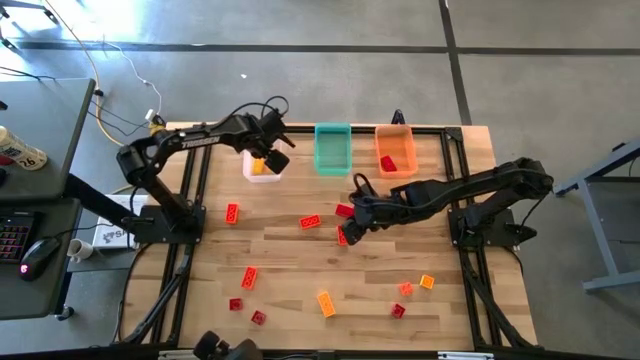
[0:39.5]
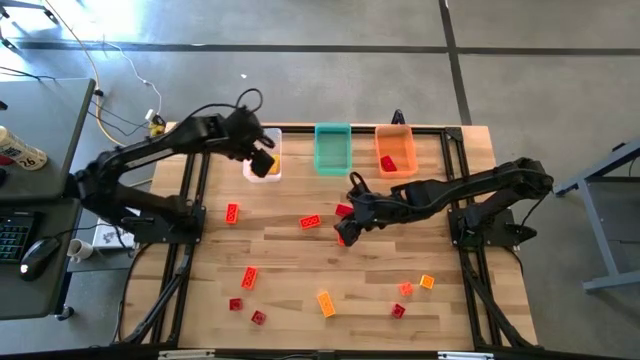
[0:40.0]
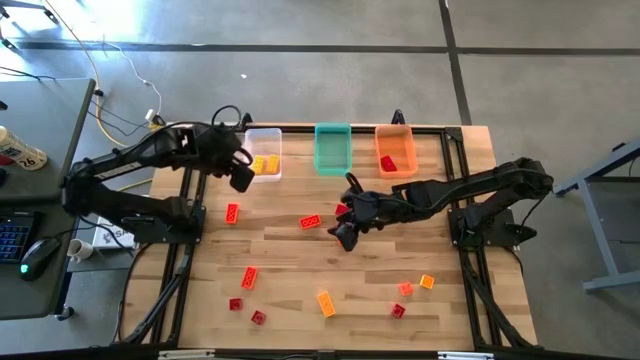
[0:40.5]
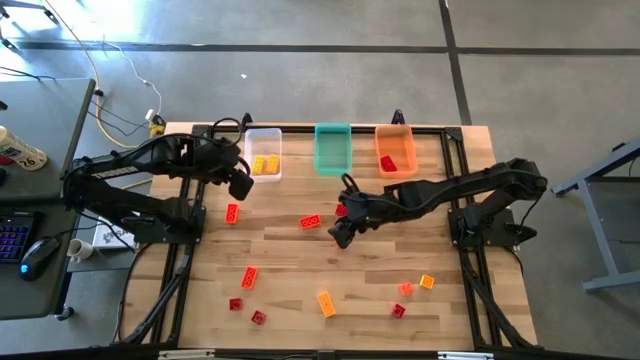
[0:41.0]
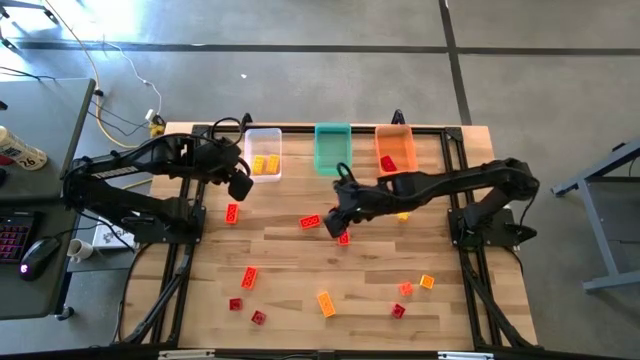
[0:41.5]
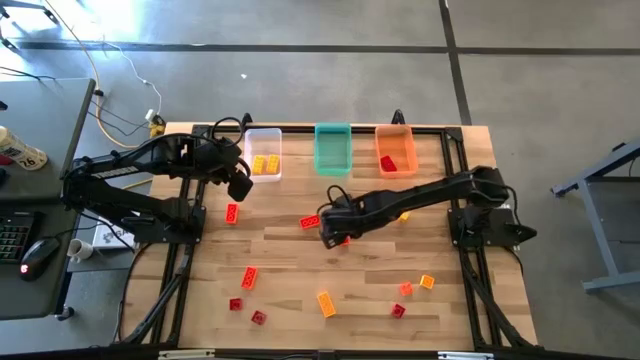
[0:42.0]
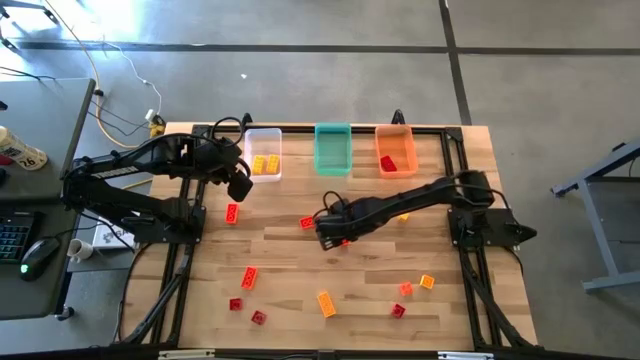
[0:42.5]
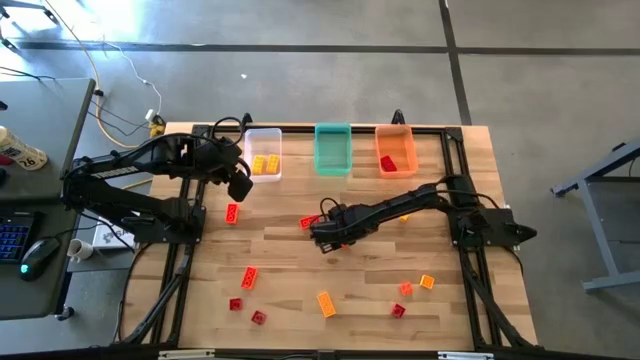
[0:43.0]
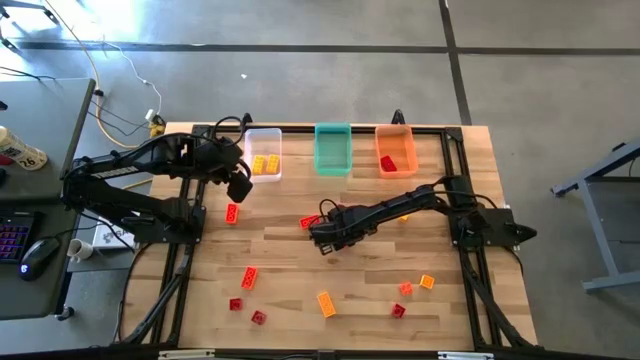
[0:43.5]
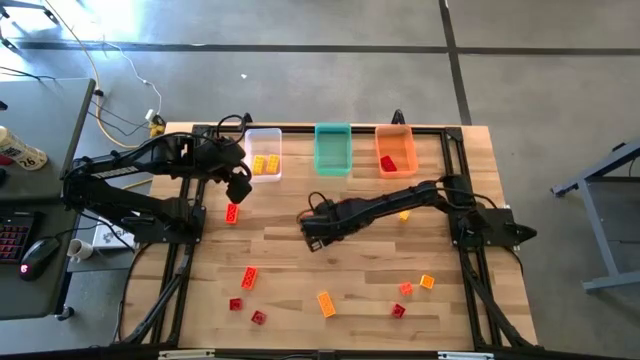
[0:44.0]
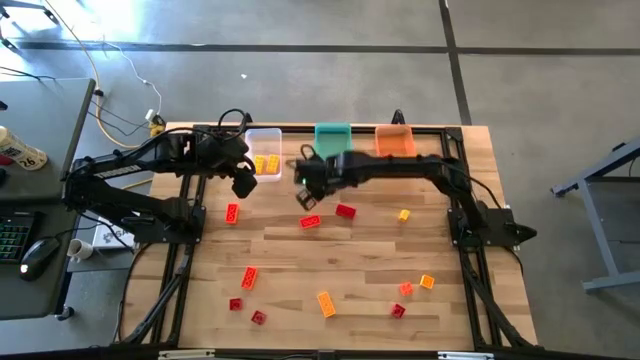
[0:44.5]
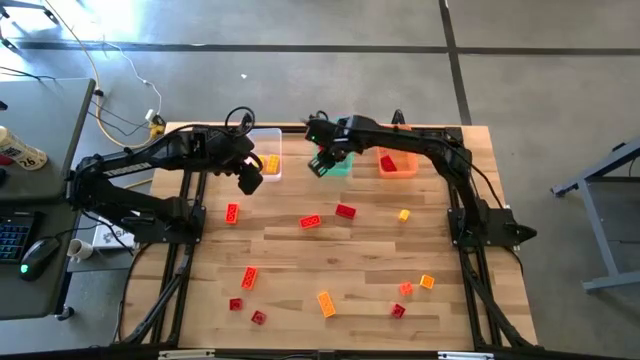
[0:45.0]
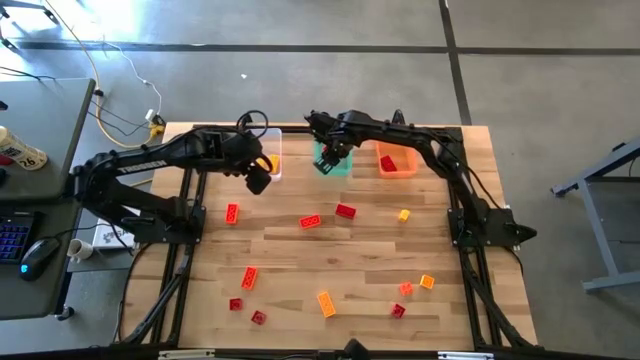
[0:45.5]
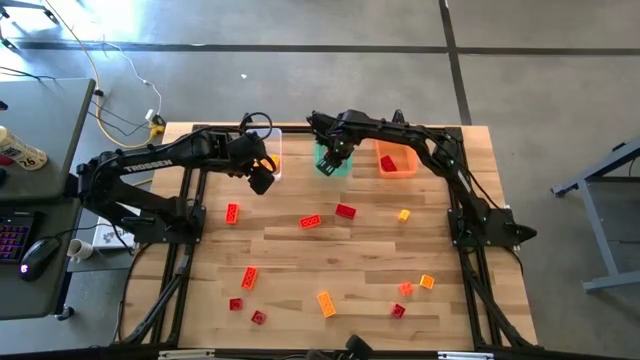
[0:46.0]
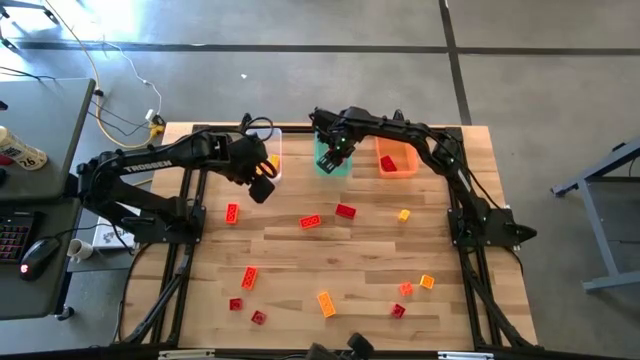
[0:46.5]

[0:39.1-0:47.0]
Task: Sort & place blocks by color
Put the orange game piece into the blue bin

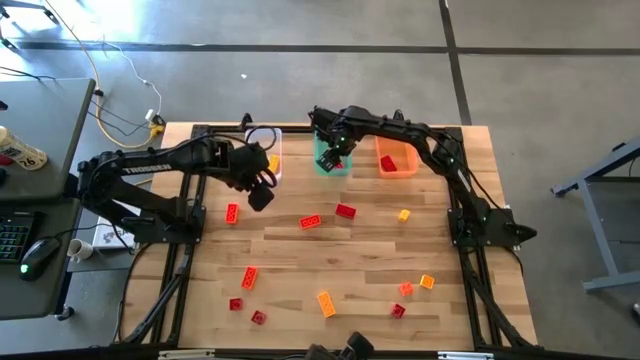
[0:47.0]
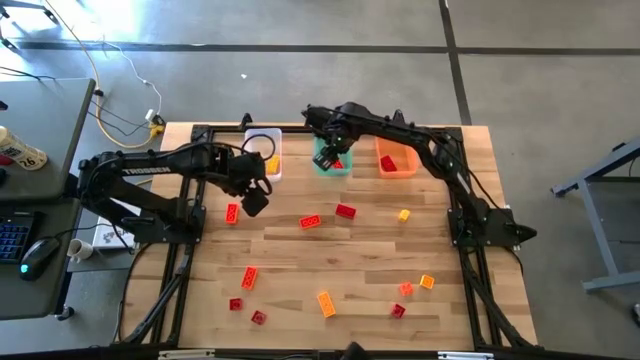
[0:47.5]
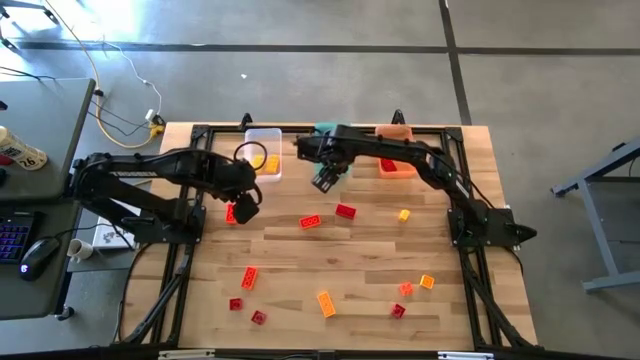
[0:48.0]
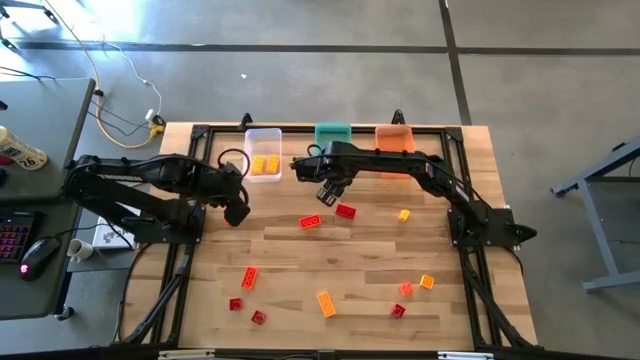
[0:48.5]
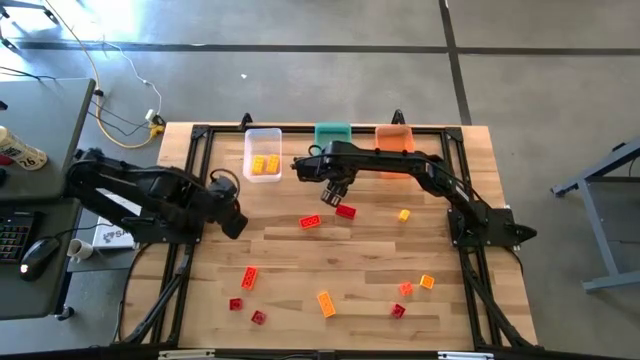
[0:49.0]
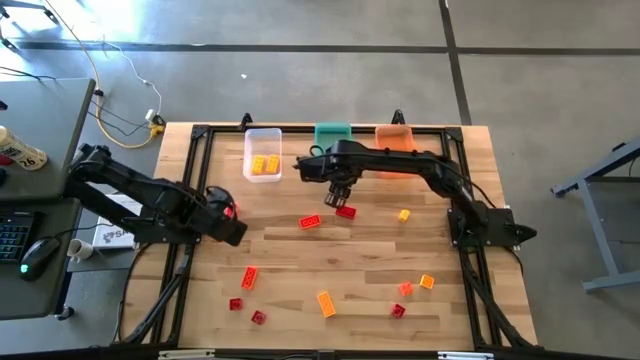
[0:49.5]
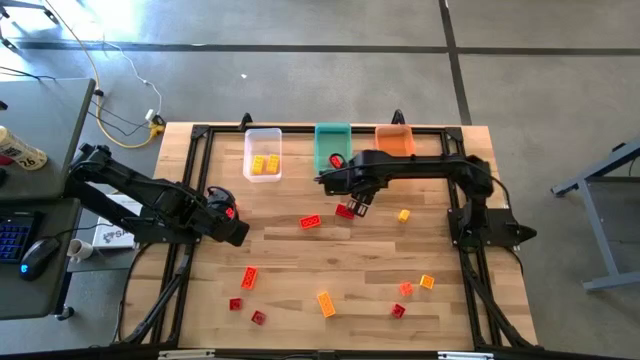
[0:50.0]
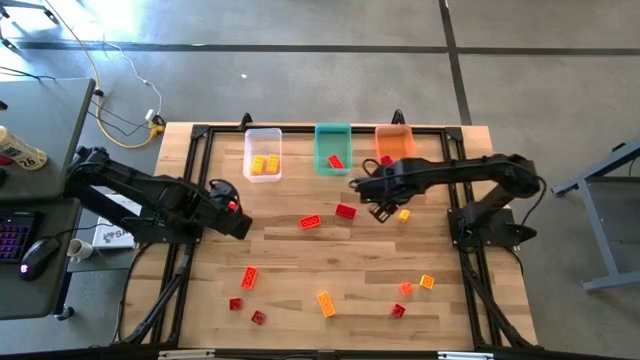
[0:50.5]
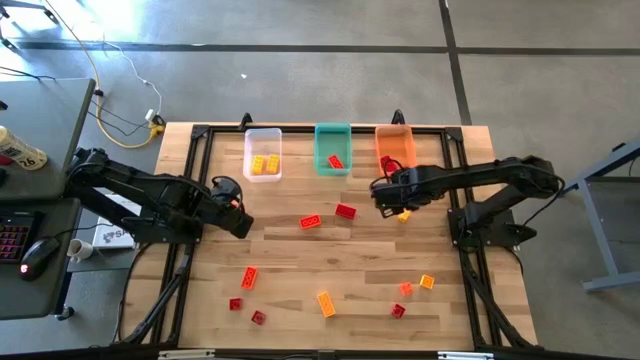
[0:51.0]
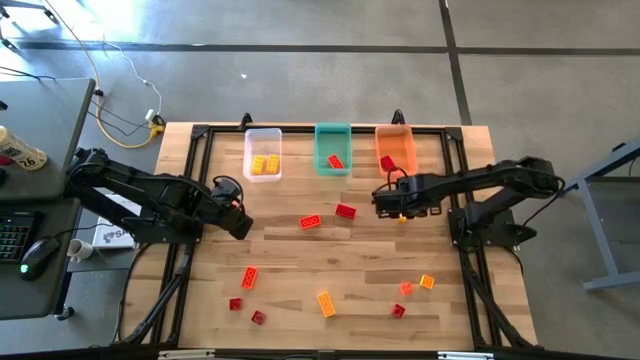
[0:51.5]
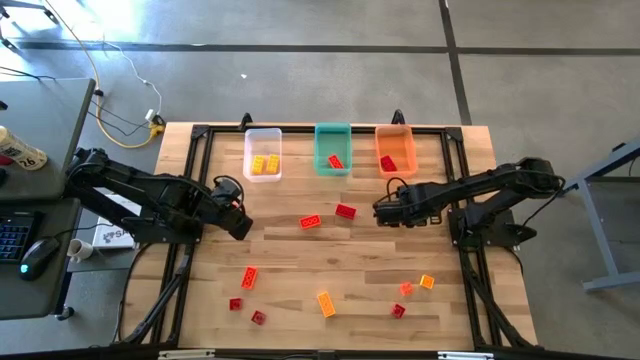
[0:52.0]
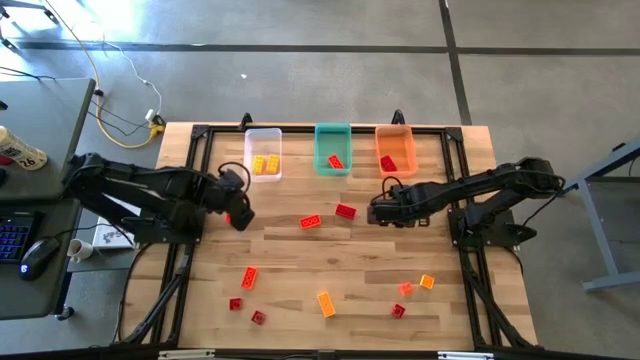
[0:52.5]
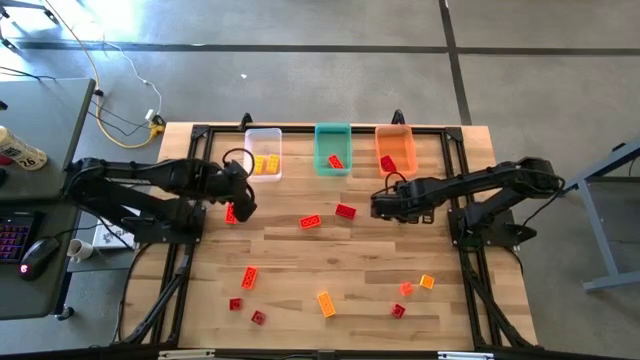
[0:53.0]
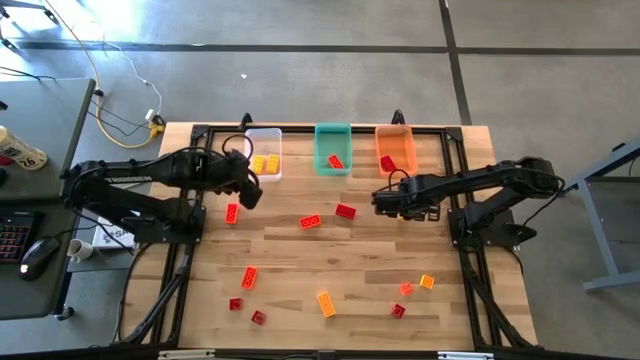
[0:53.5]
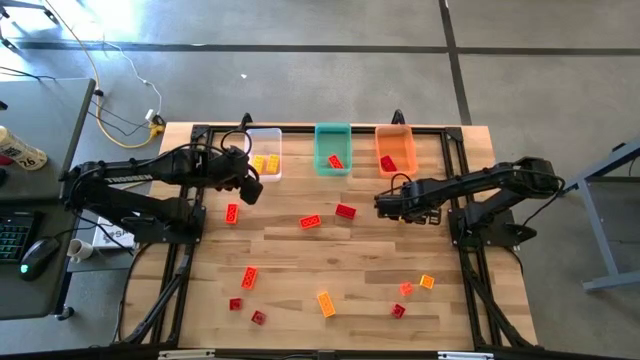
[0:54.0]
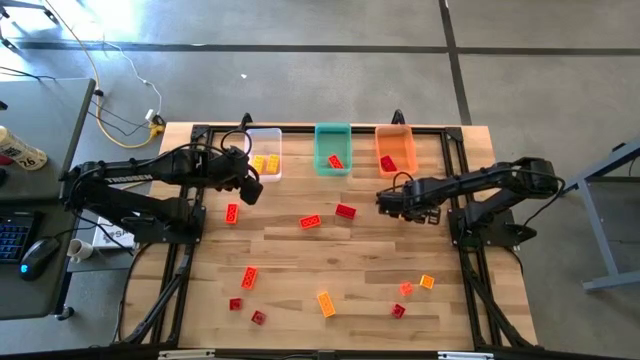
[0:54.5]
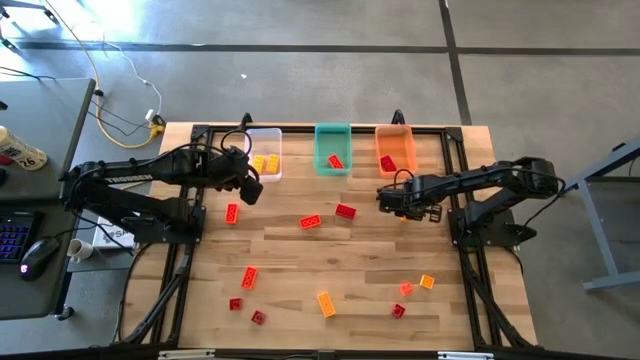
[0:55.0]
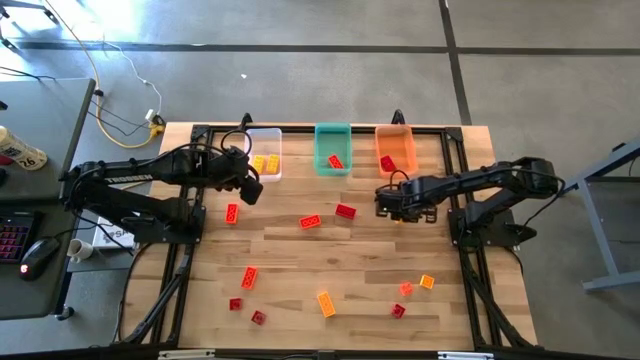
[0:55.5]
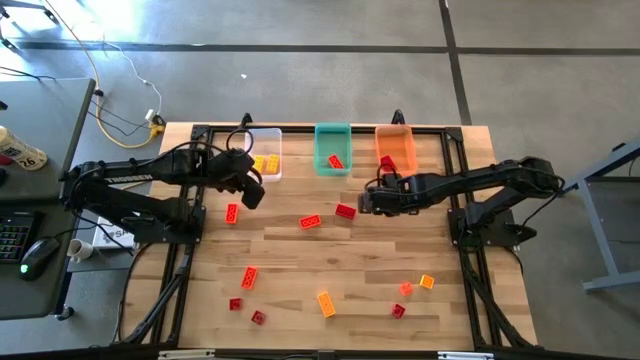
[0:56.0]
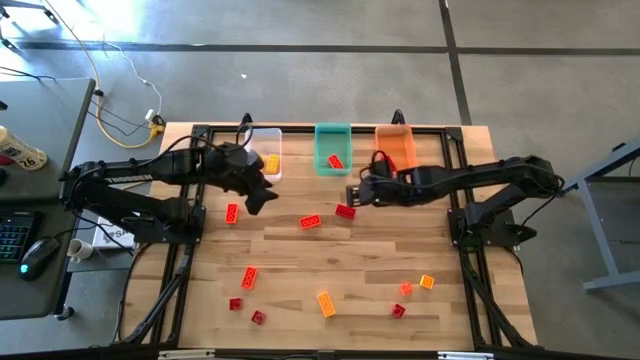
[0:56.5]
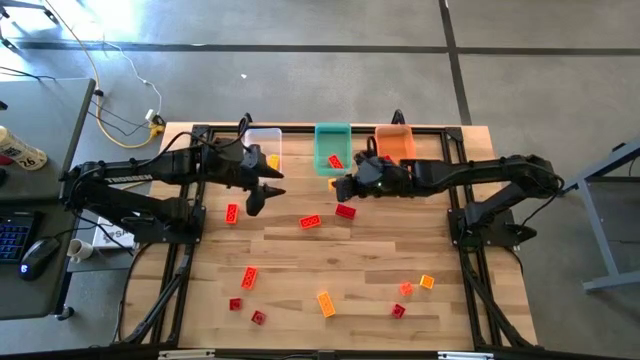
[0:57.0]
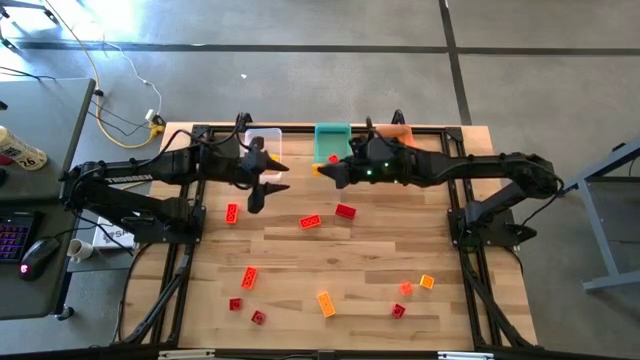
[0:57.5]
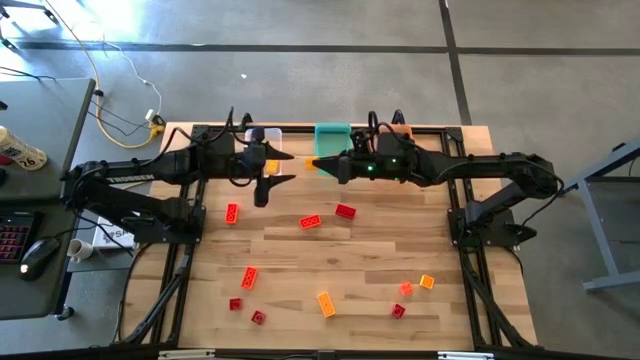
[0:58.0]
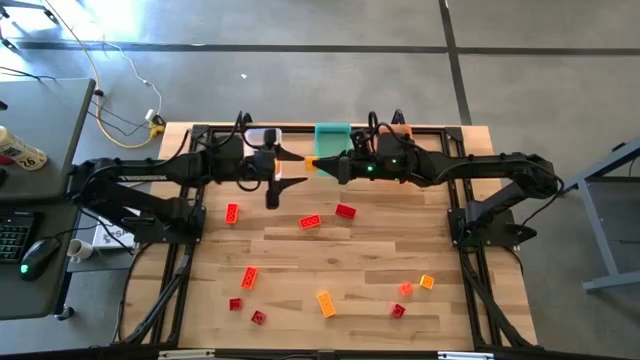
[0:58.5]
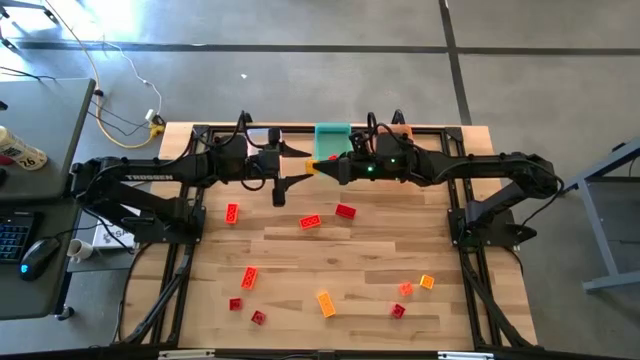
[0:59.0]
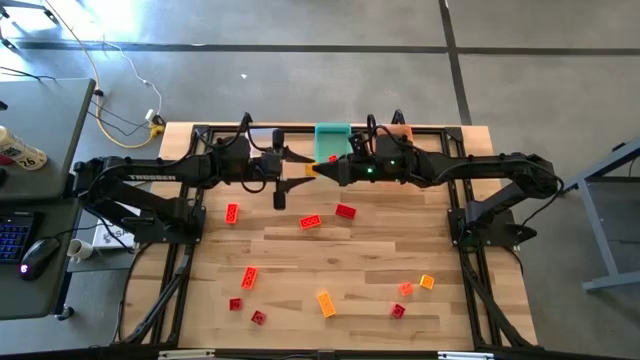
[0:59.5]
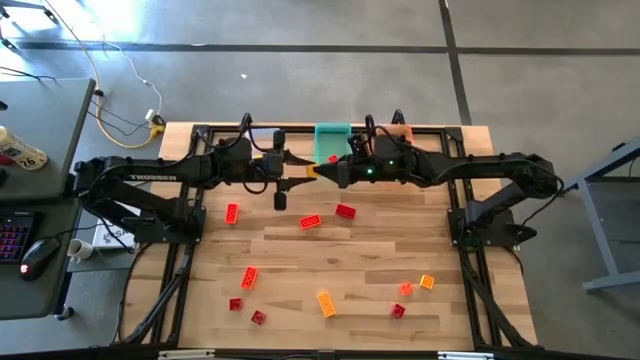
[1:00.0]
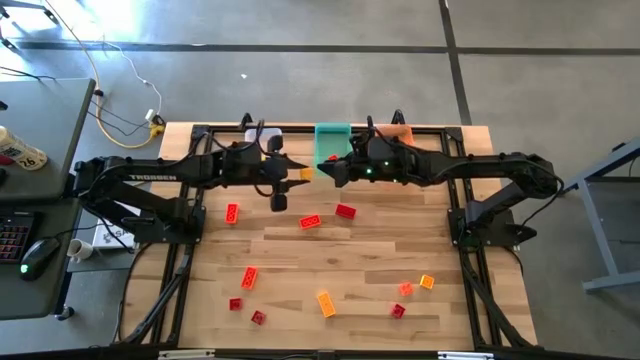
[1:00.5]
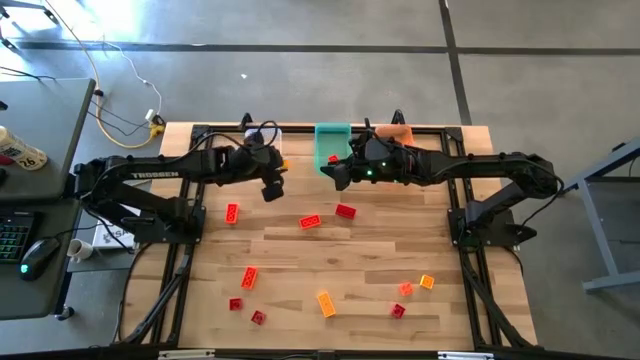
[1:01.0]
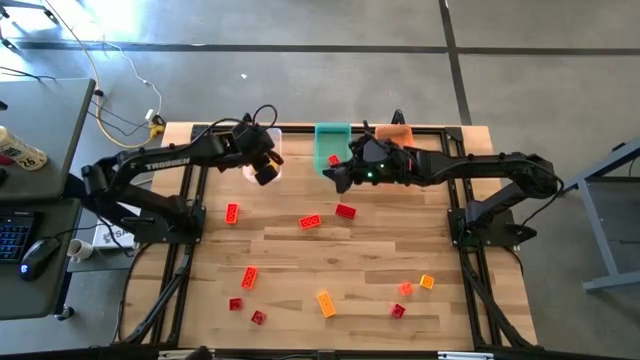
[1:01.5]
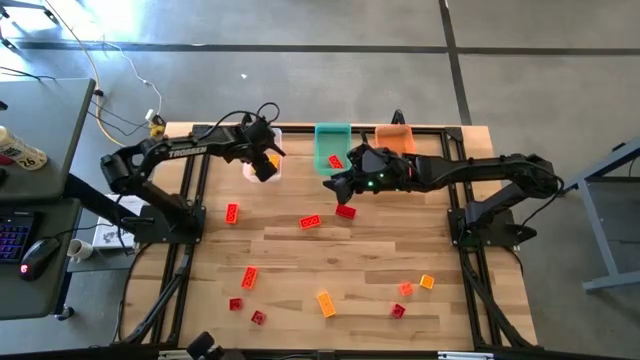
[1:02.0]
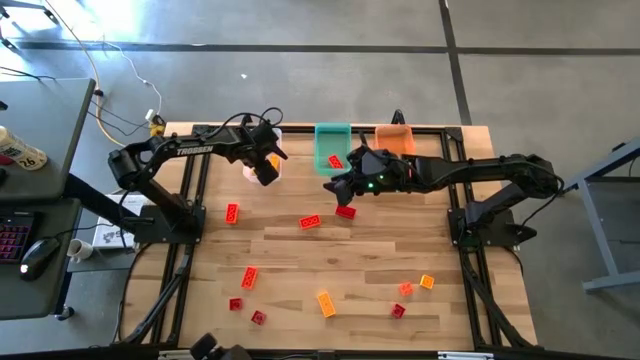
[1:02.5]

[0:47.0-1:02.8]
Put the yellow game piece into the transparent bin
